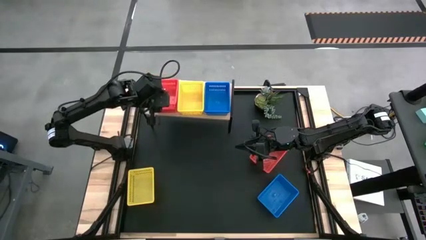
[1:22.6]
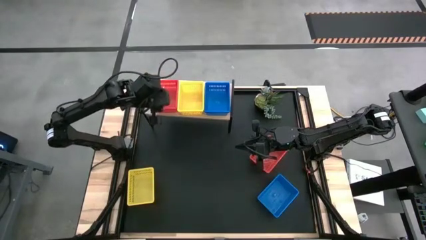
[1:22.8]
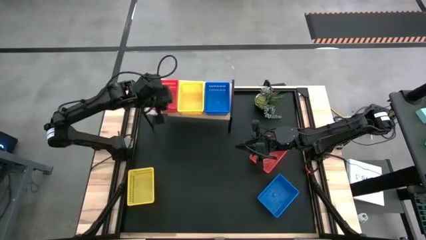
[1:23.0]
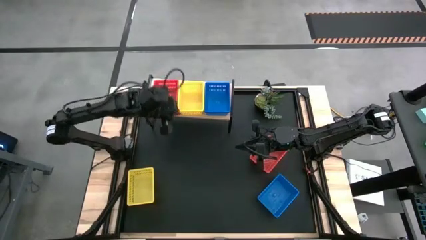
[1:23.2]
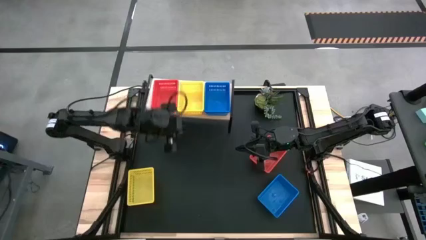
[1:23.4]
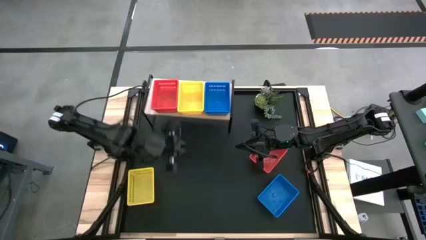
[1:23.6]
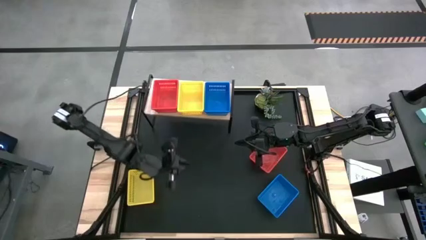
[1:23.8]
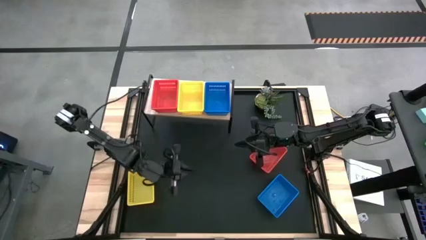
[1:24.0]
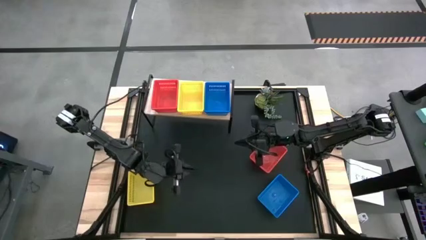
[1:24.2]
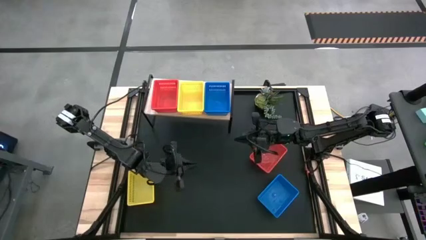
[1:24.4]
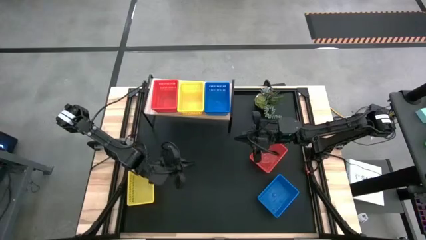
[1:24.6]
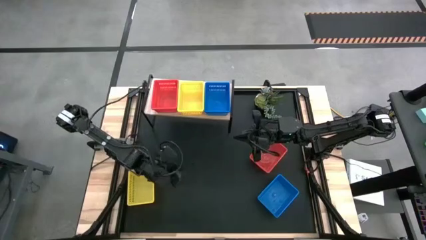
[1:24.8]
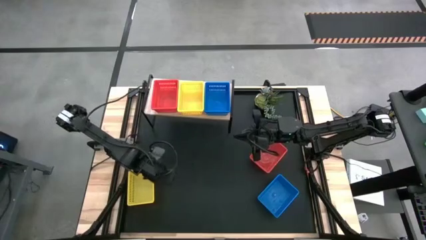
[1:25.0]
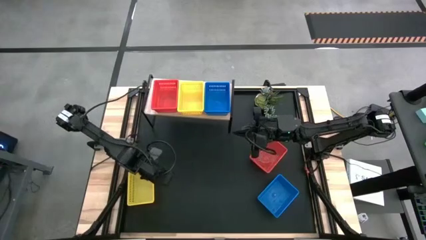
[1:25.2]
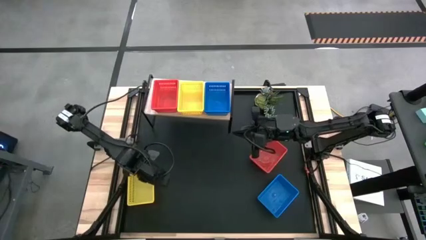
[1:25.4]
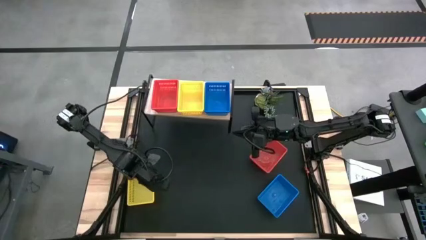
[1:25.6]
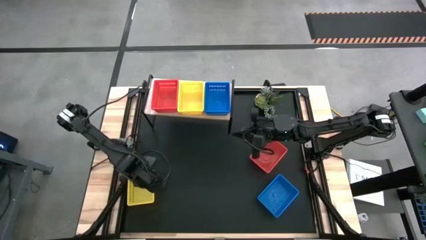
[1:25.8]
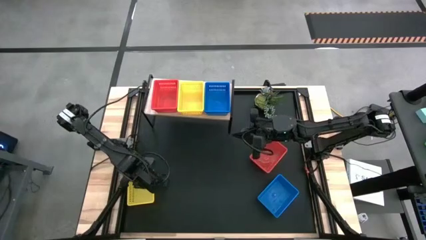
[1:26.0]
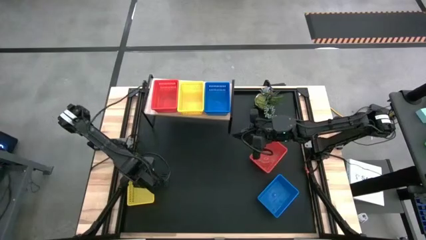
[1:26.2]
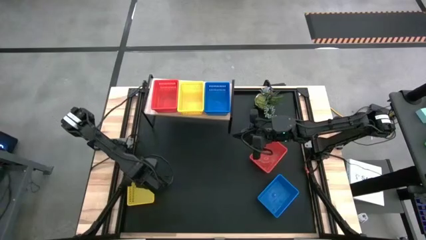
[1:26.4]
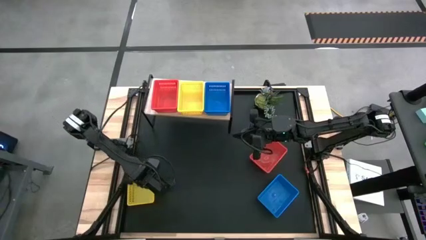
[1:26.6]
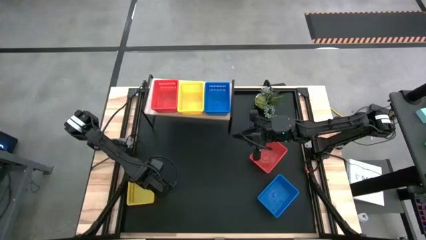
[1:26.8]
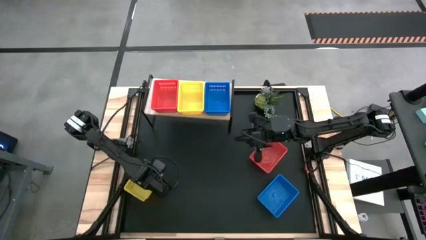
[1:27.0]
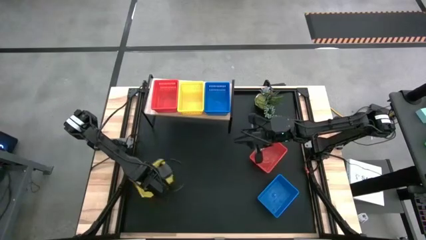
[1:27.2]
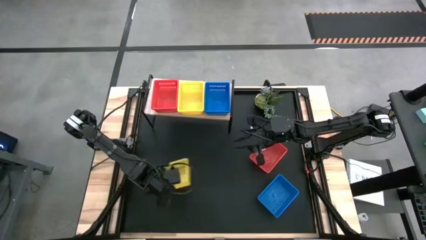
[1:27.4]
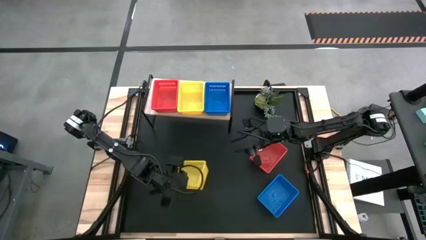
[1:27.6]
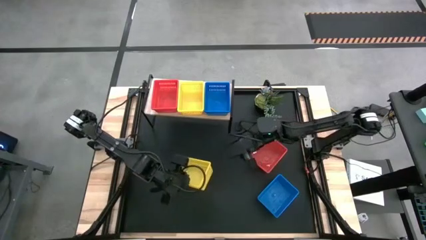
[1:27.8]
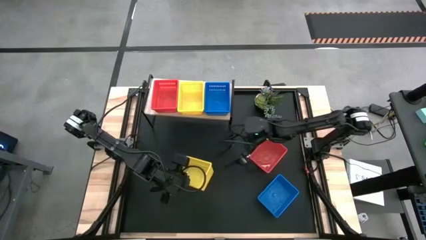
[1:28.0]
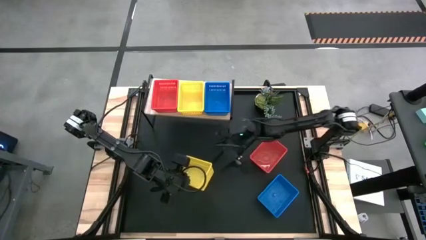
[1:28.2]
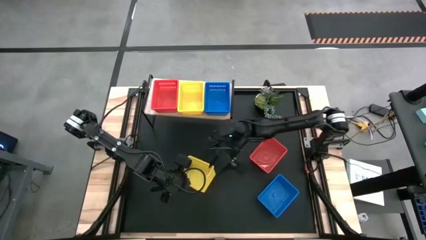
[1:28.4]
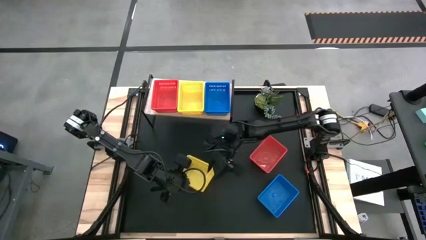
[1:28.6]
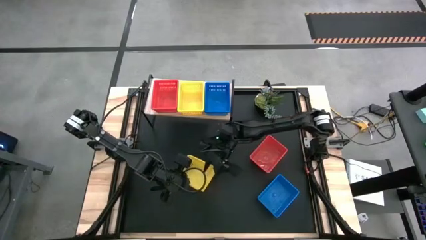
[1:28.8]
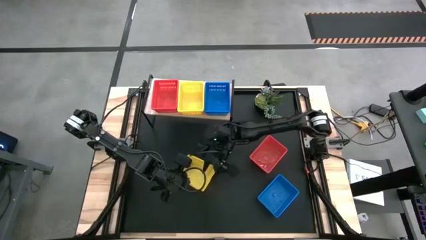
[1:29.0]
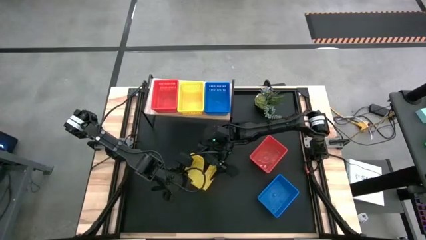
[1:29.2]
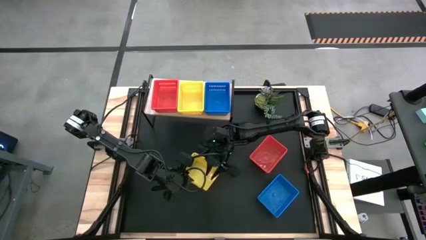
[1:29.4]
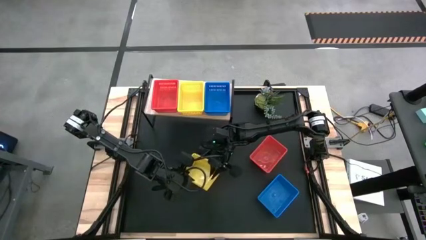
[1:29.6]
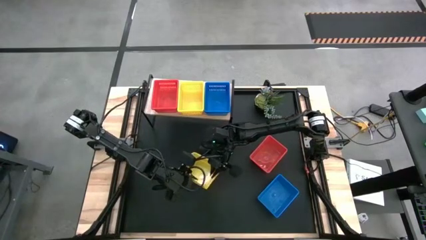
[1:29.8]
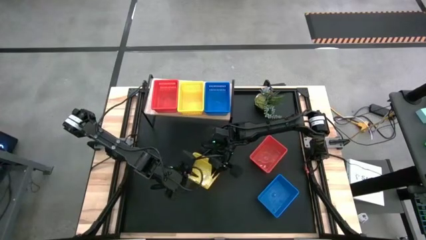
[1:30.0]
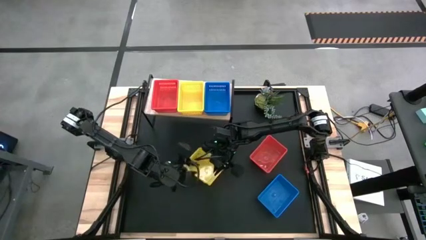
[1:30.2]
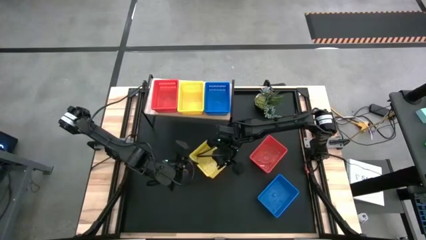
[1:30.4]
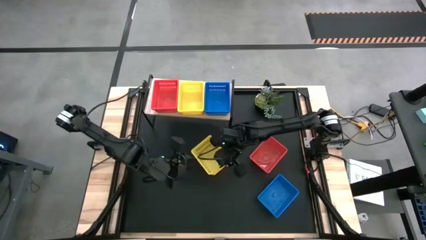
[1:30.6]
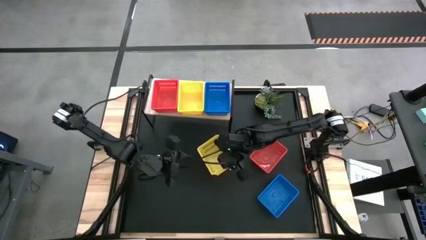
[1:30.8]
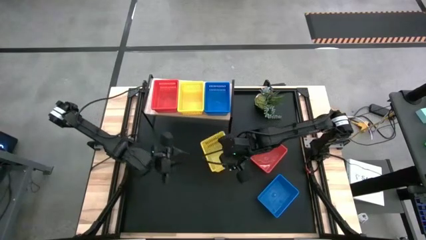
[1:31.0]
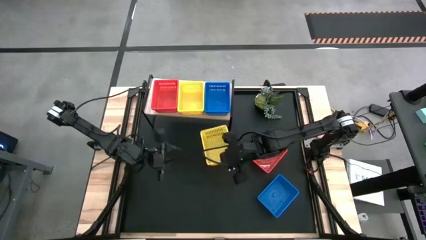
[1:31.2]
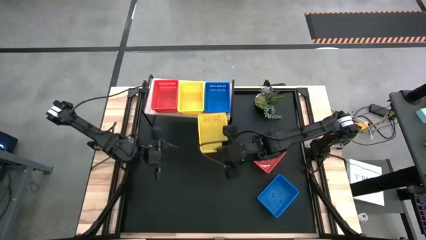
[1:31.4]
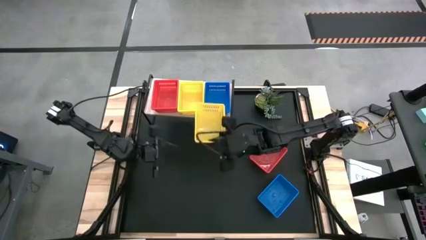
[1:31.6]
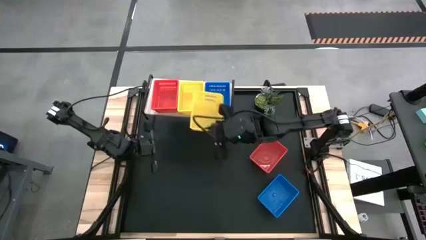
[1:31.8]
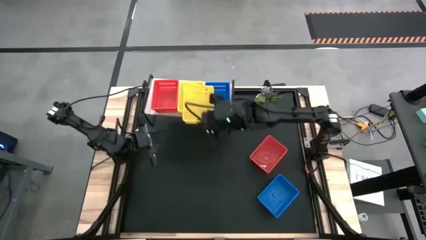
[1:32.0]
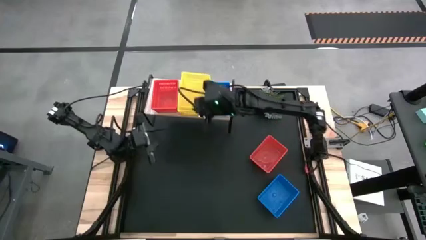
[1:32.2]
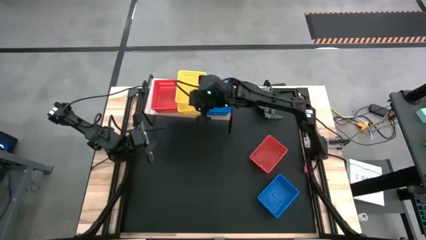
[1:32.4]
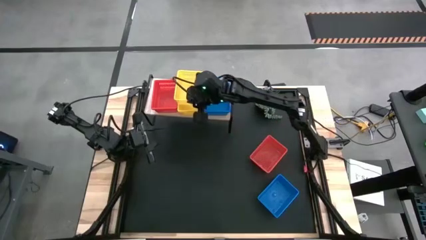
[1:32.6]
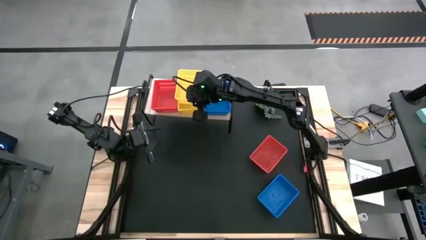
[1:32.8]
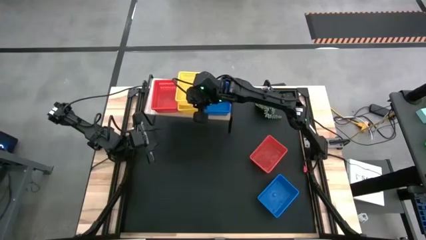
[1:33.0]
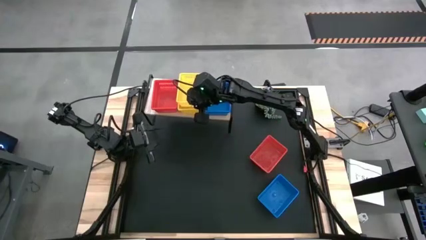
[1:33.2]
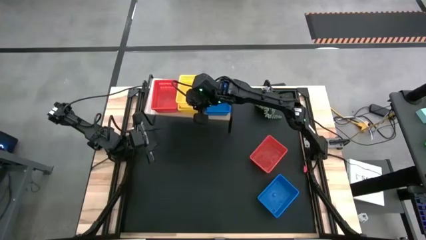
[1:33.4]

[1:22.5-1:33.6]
Task: Stack baskets on shelf by color
Stack the yellow bin on top of the yellow bins on the shelf
